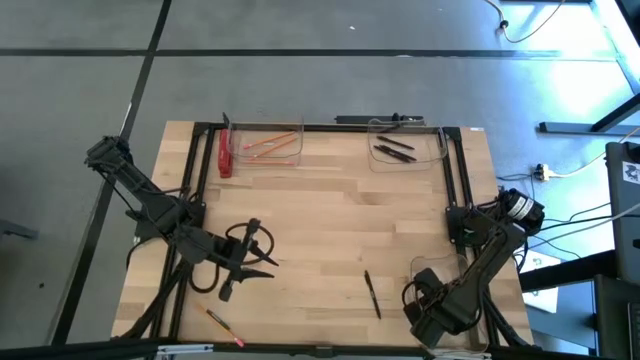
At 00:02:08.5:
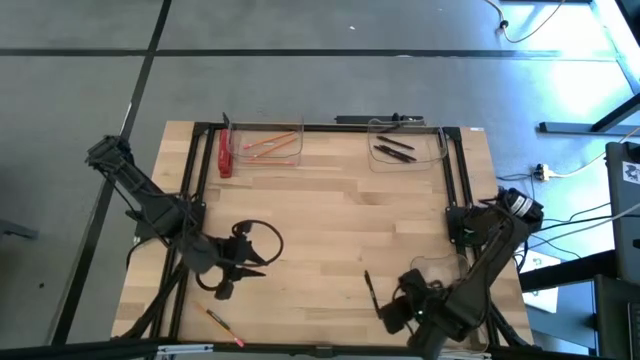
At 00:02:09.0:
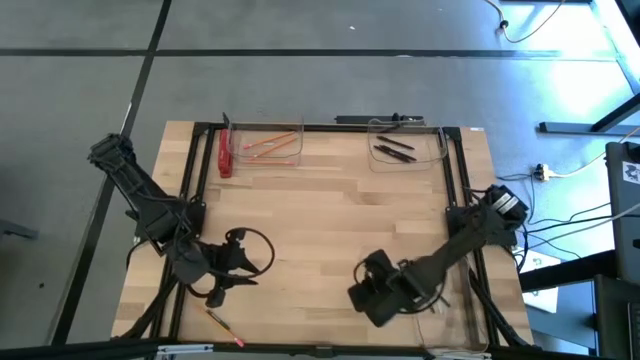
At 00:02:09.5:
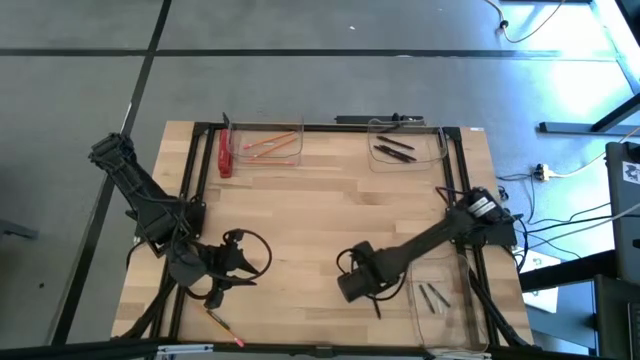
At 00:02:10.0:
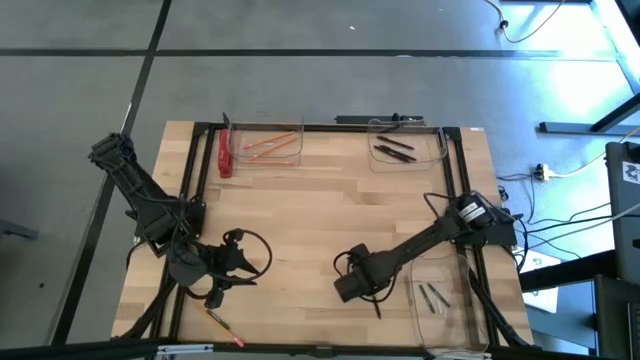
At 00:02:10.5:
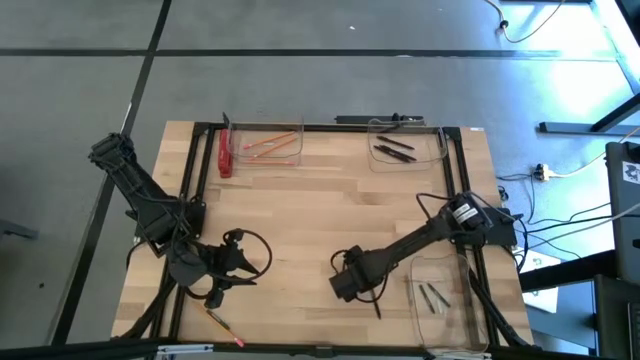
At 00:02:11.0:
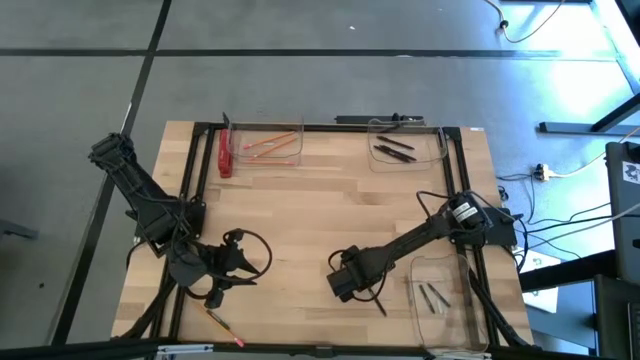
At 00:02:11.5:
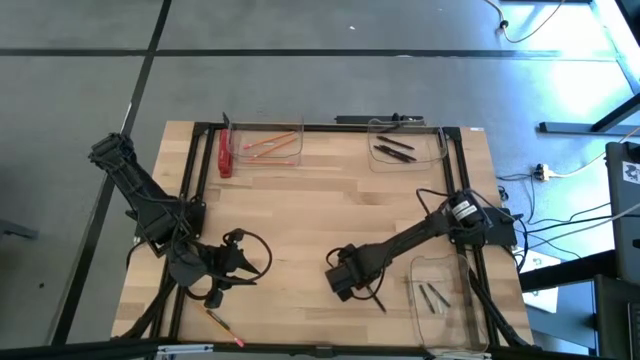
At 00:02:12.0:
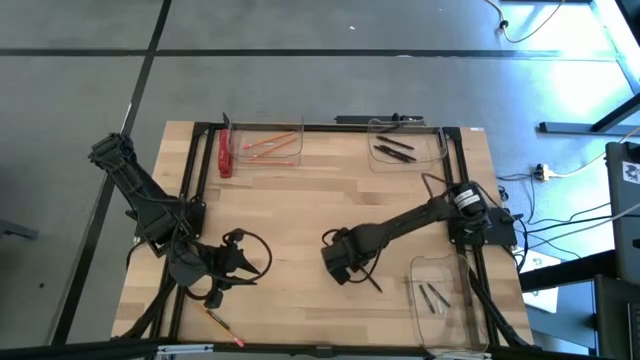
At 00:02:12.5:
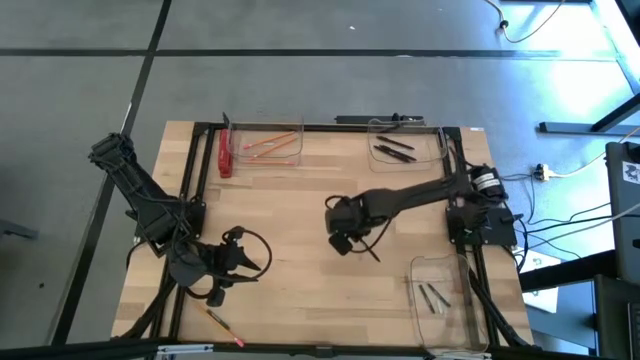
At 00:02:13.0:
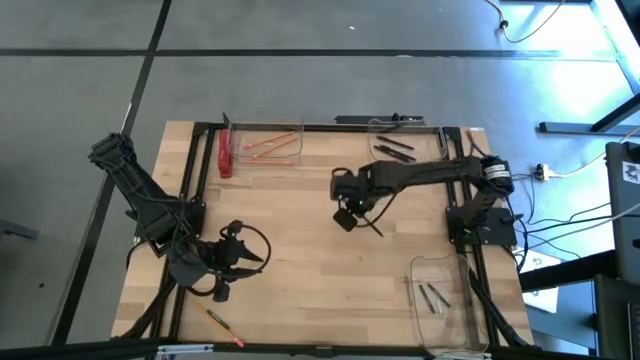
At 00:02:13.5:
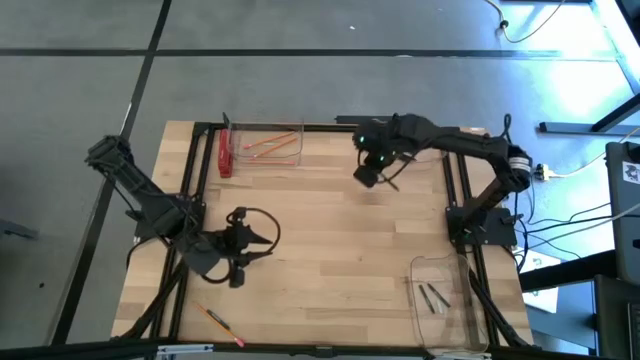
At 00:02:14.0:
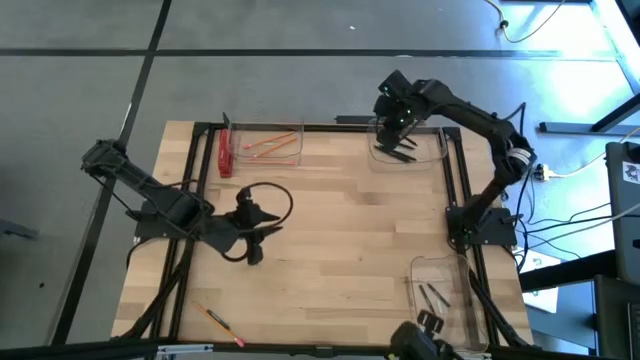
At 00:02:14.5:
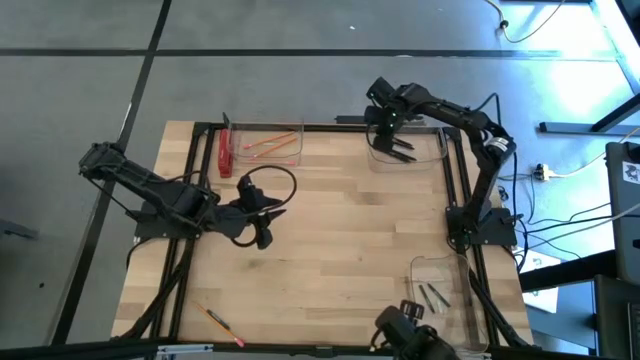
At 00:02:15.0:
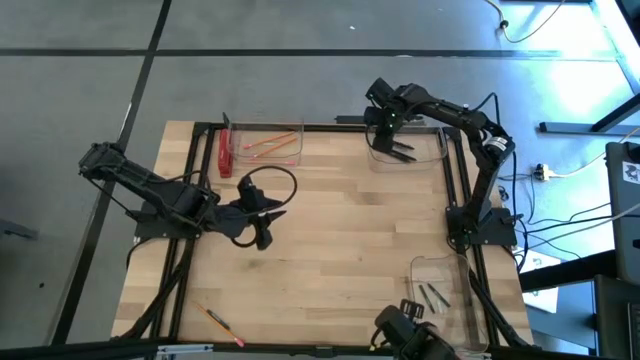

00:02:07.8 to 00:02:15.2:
Task: Sort crayons/erasers/pens/pencils in bins
Put the black pen into the top right transparent bin

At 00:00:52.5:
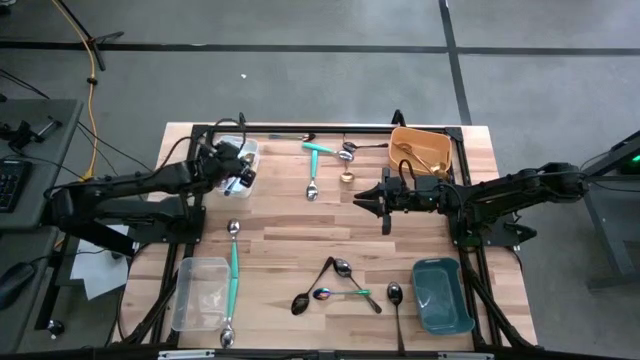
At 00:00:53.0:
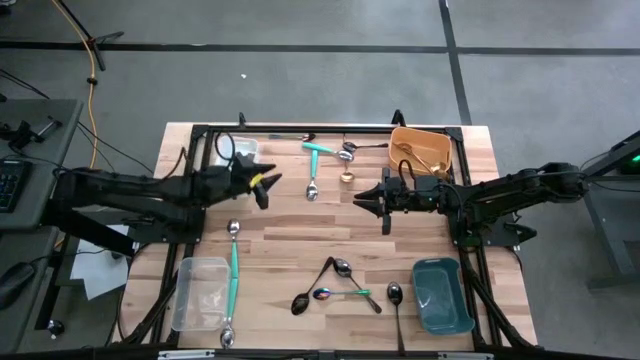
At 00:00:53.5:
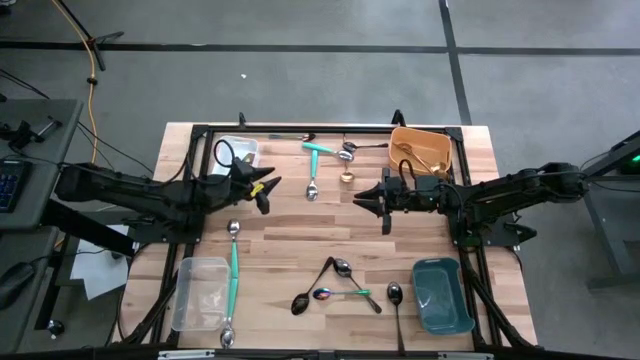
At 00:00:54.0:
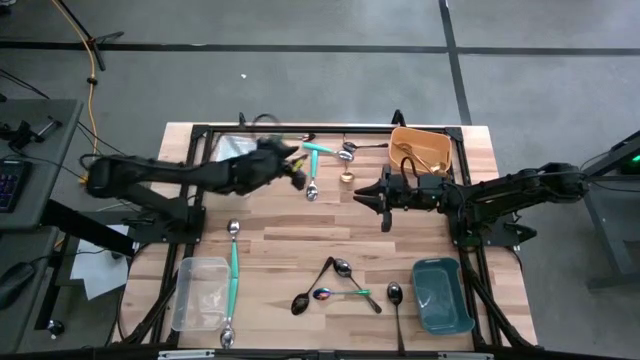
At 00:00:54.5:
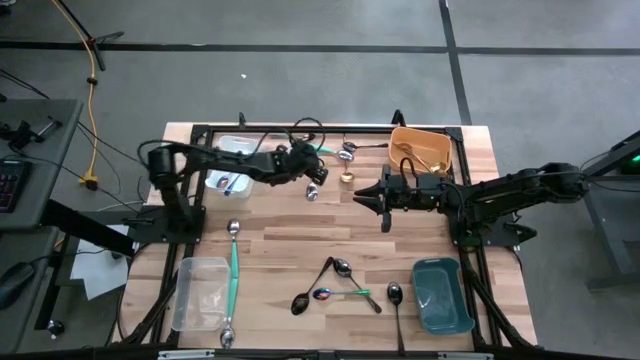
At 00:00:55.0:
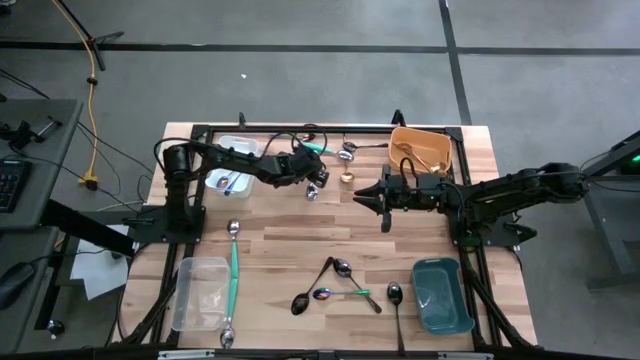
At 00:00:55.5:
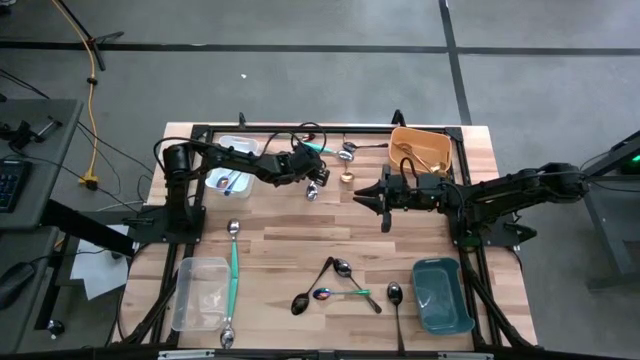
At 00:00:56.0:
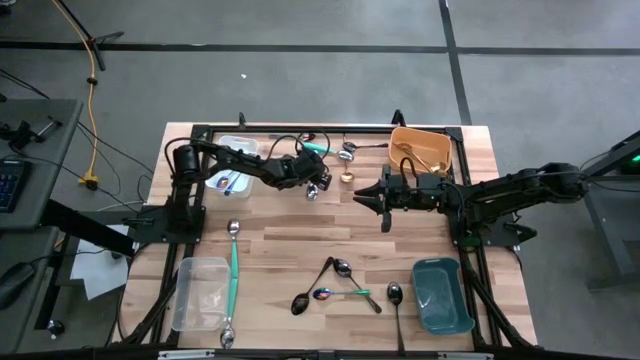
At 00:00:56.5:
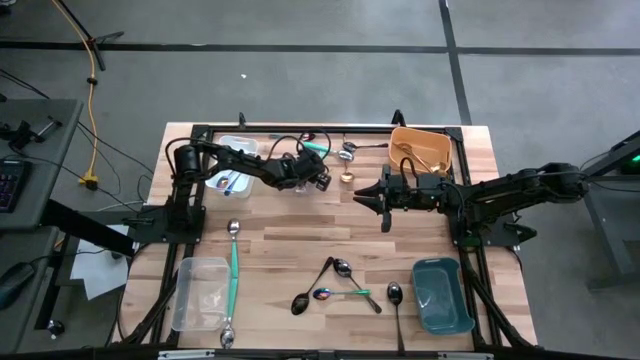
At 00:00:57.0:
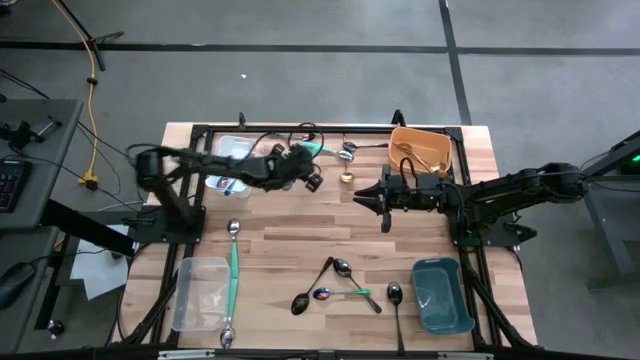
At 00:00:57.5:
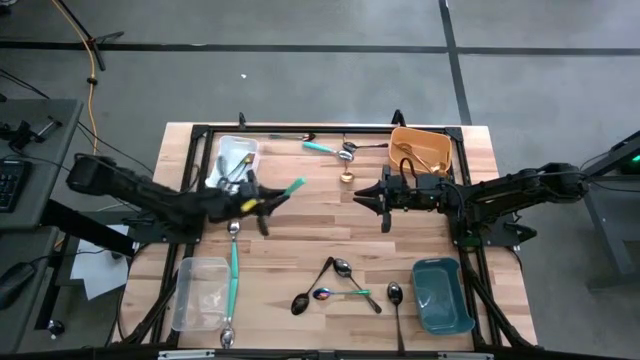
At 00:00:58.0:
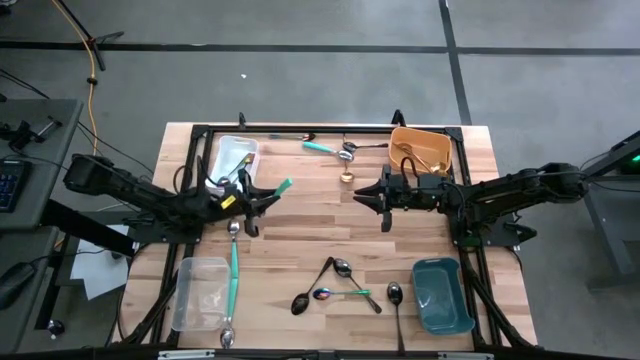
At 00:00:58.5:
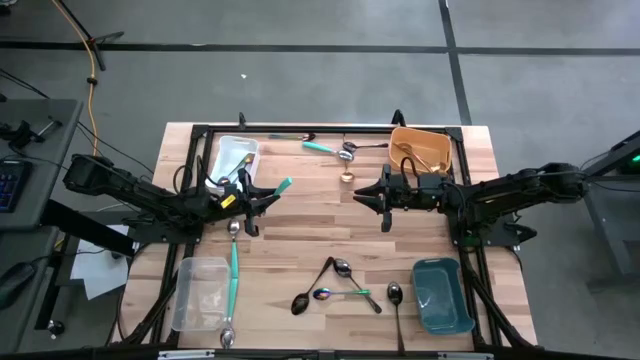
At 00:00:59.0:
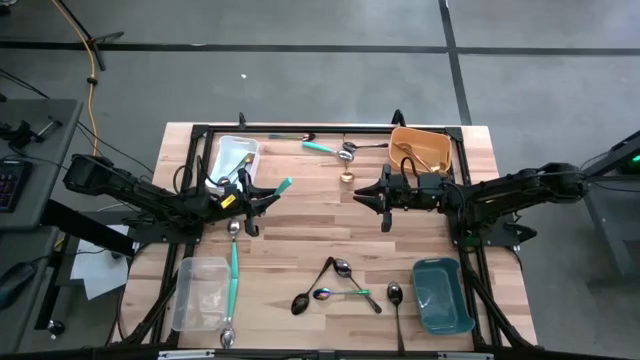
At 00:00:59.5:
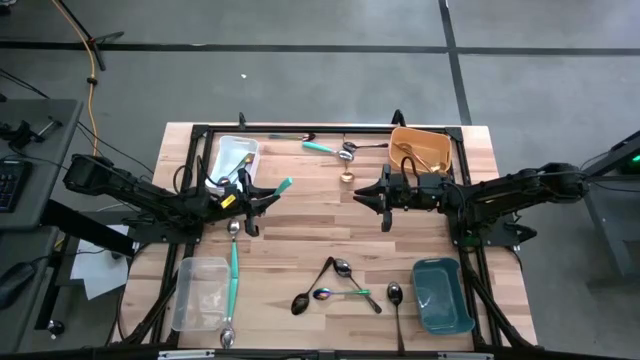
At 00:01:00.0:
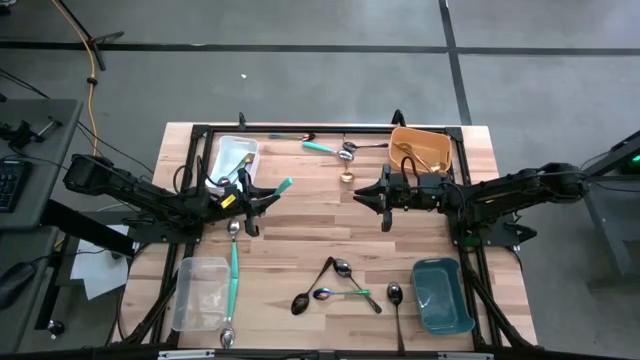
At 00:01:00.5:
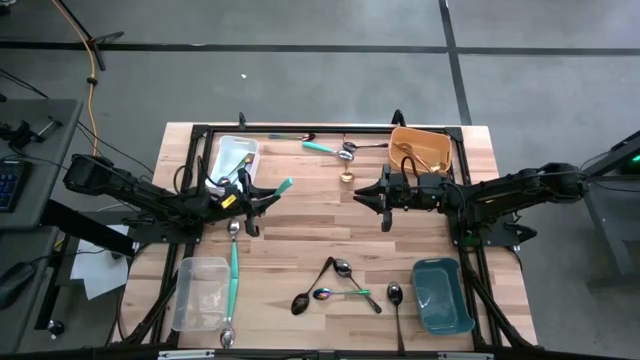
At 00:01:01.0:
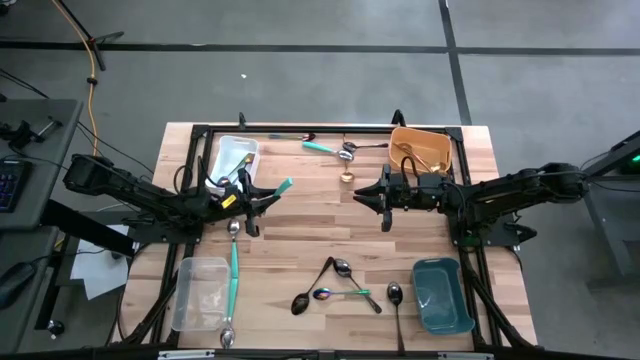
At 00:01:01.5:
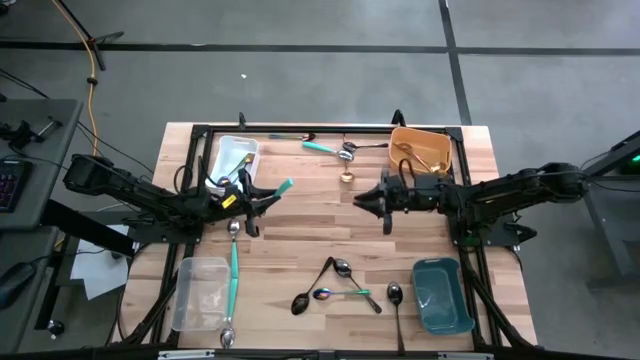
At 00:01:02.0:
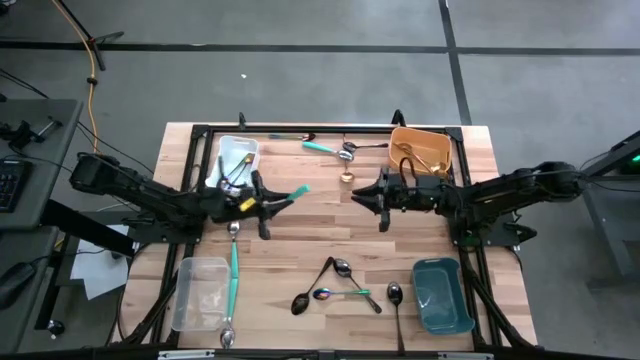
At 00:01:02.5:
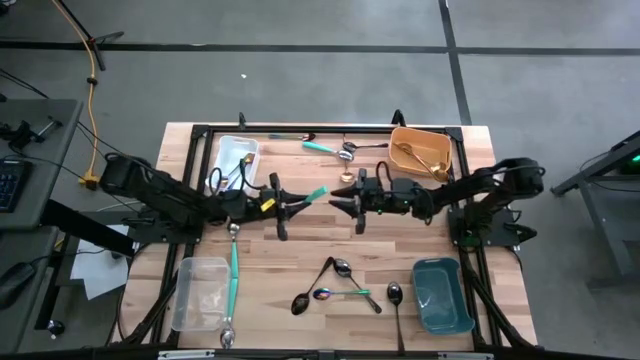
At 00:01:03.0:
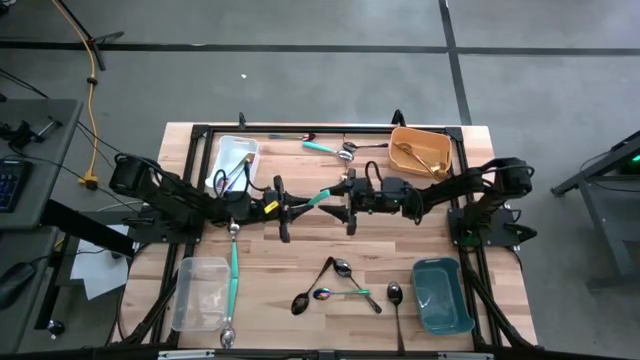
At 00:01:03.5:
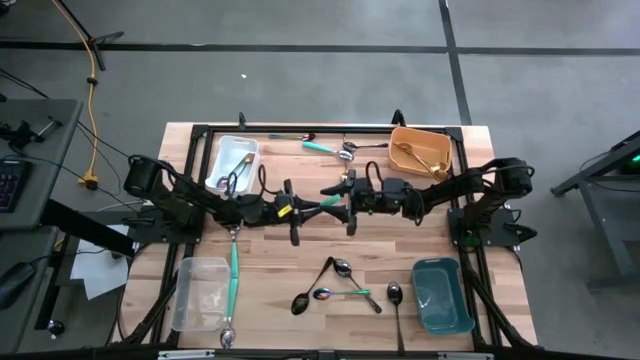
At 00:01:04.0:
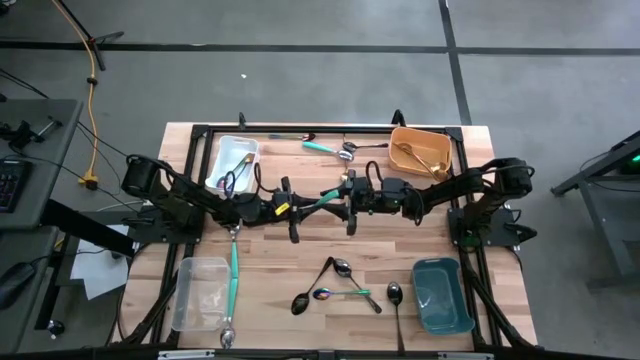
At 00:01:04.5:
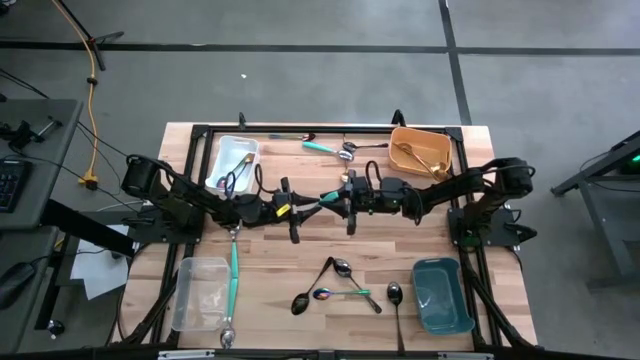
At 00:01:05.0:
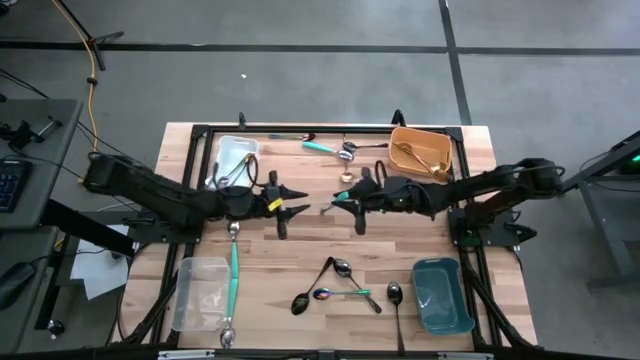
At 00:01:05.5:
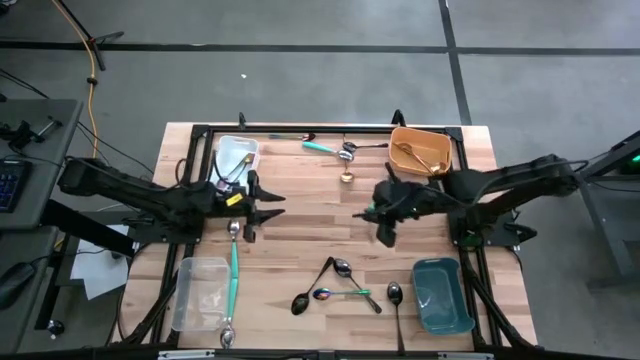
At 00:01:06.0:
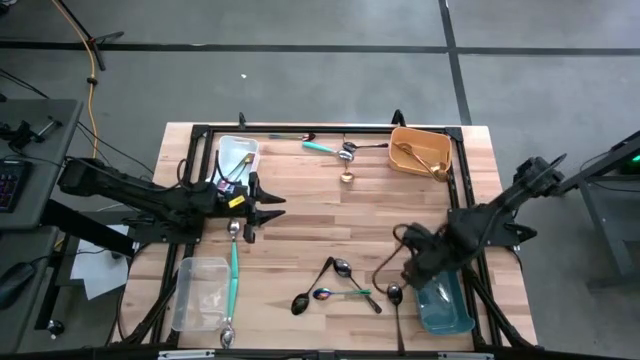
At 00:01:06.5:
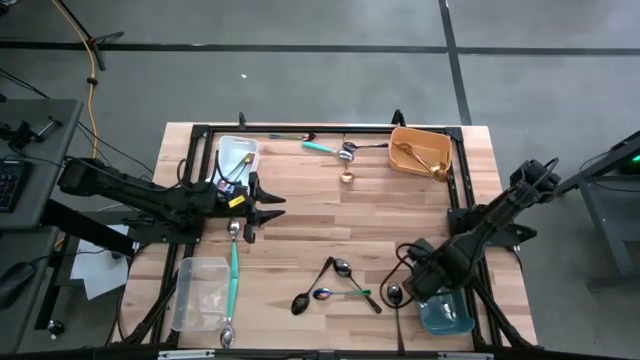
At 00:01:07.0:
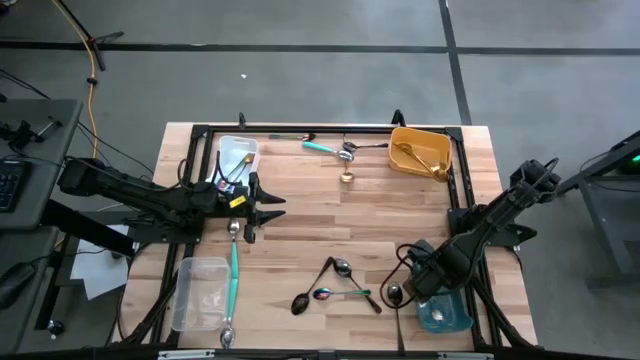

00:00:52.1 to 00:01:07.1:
Task: Sort silverware by color (type)
Put the green spoon into the blue bin
